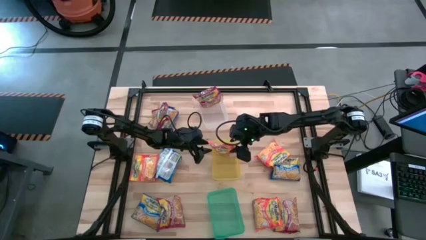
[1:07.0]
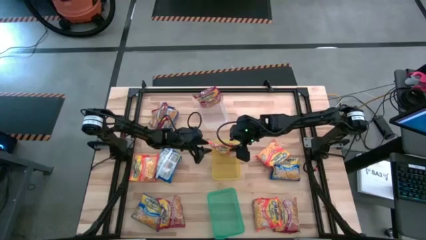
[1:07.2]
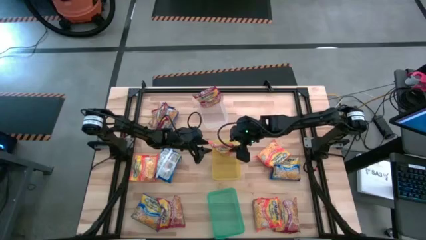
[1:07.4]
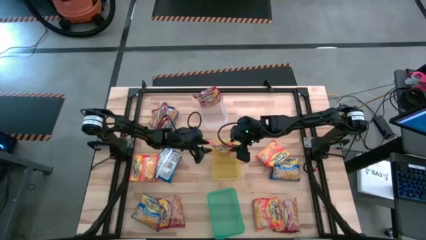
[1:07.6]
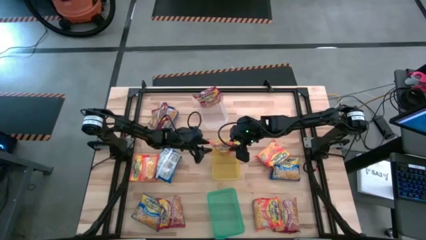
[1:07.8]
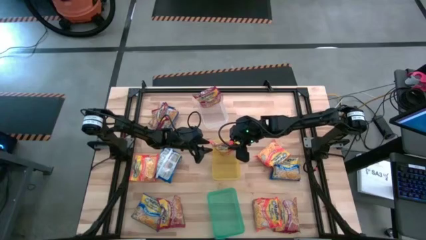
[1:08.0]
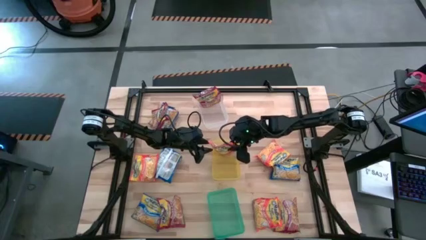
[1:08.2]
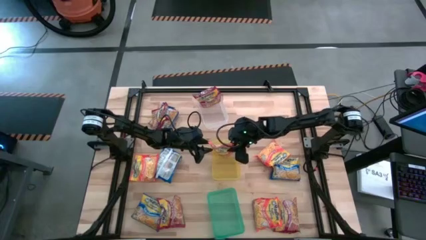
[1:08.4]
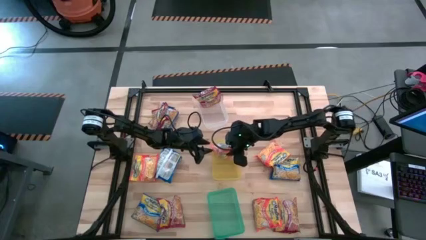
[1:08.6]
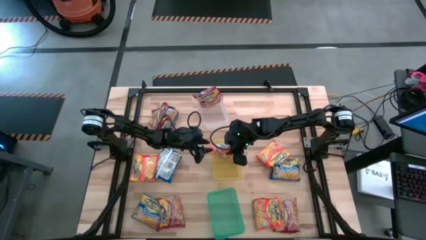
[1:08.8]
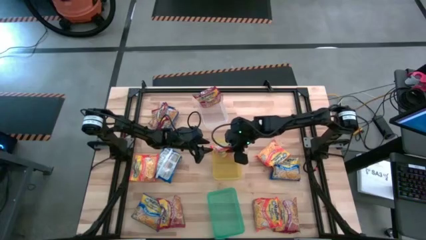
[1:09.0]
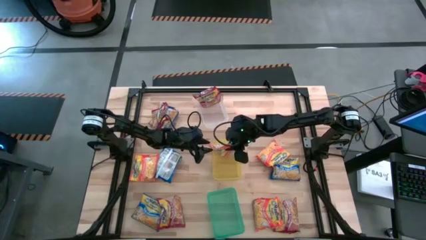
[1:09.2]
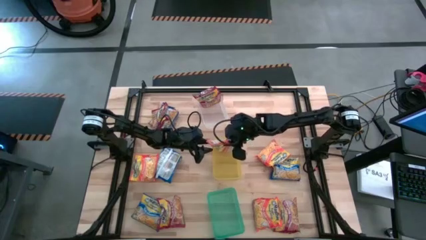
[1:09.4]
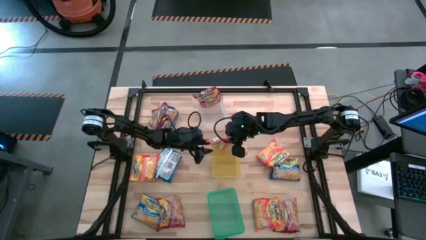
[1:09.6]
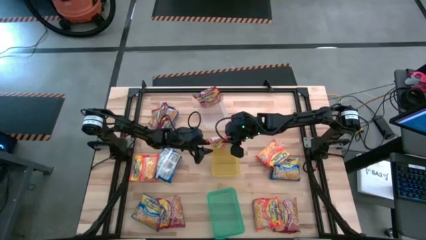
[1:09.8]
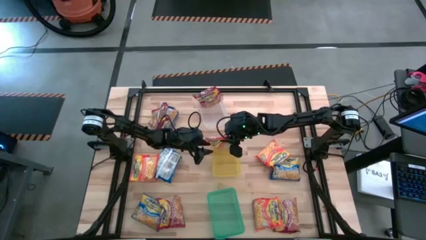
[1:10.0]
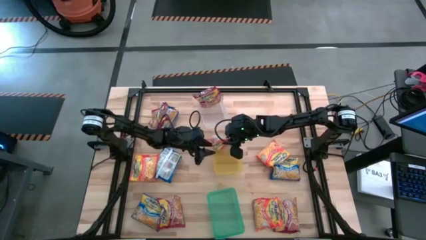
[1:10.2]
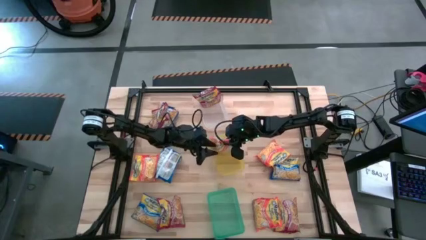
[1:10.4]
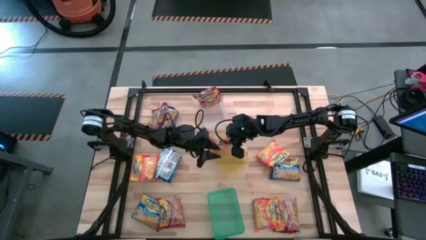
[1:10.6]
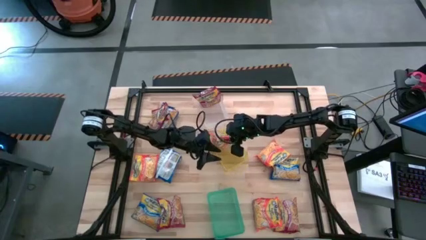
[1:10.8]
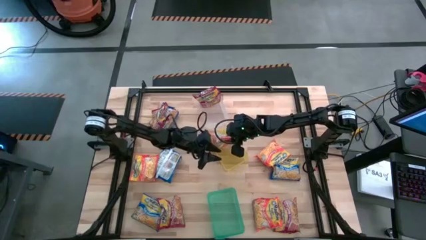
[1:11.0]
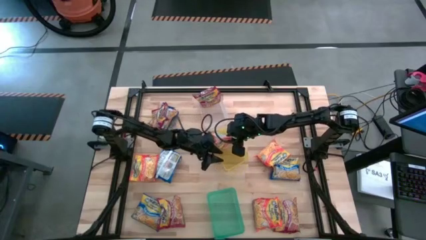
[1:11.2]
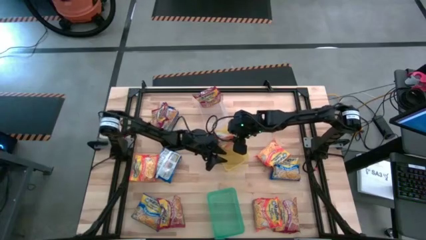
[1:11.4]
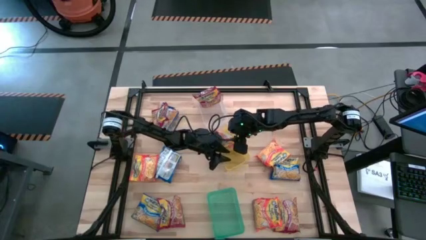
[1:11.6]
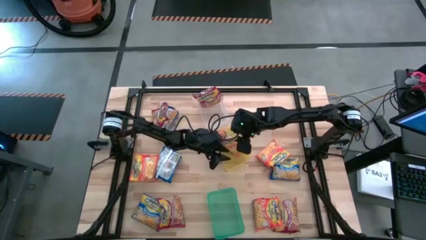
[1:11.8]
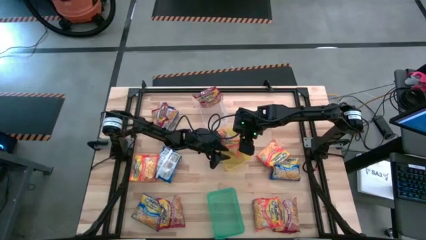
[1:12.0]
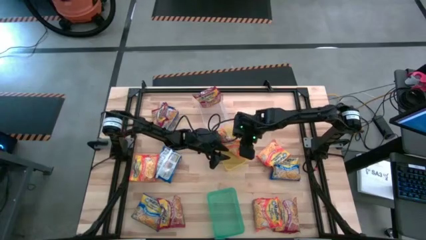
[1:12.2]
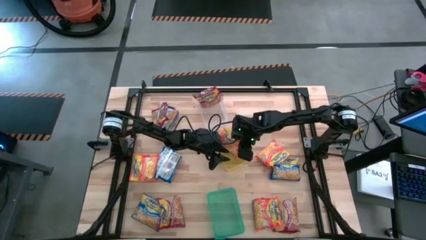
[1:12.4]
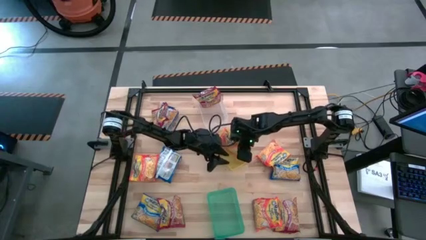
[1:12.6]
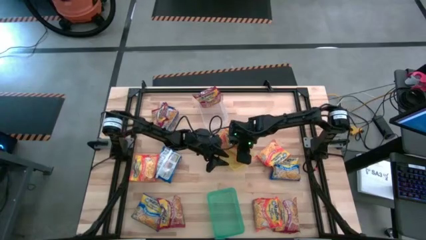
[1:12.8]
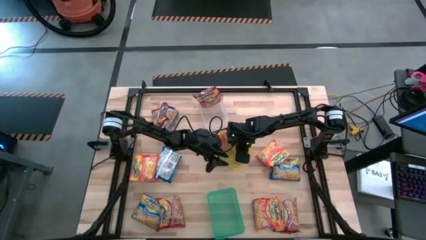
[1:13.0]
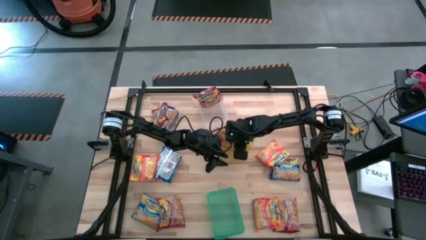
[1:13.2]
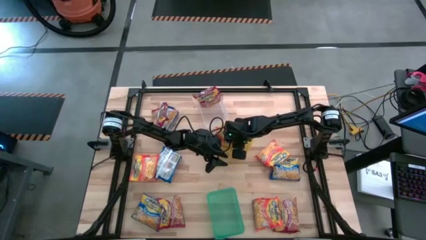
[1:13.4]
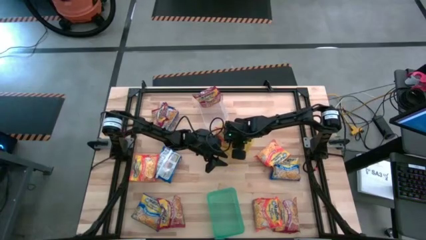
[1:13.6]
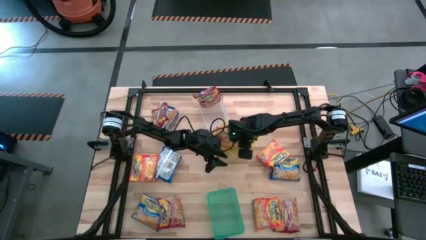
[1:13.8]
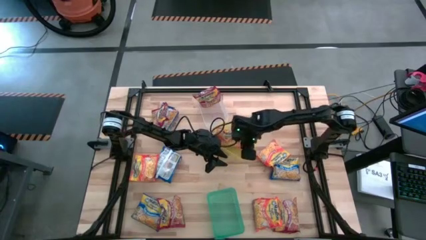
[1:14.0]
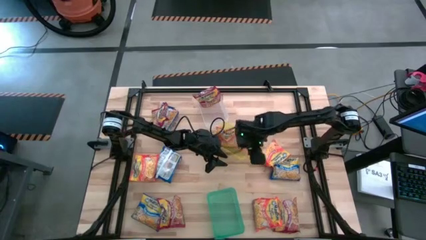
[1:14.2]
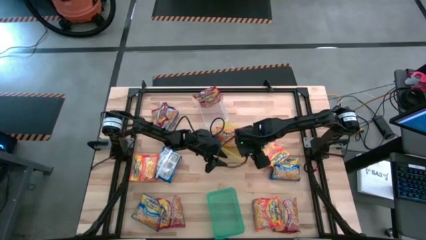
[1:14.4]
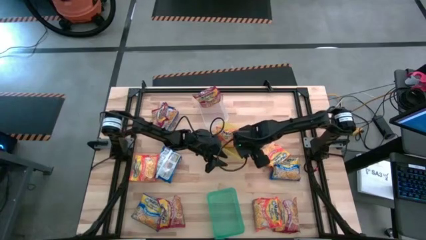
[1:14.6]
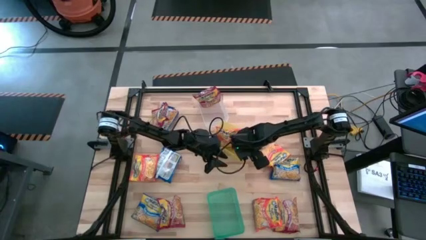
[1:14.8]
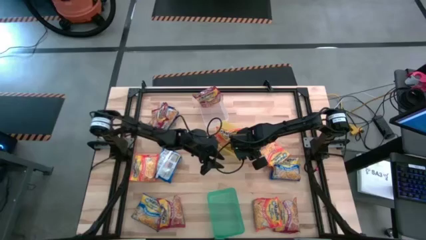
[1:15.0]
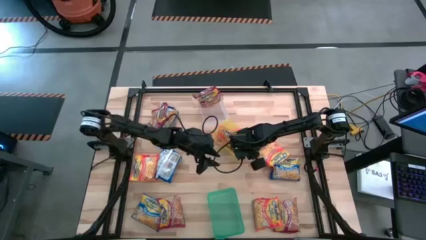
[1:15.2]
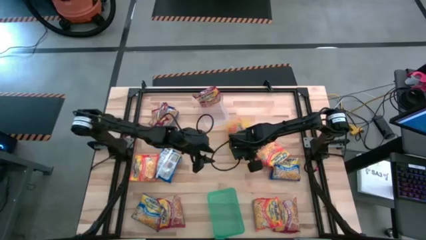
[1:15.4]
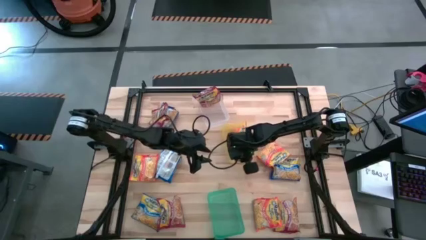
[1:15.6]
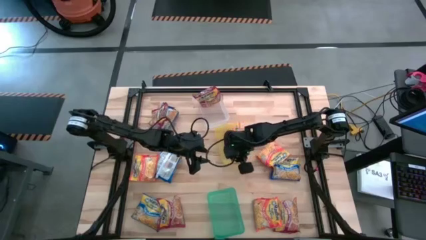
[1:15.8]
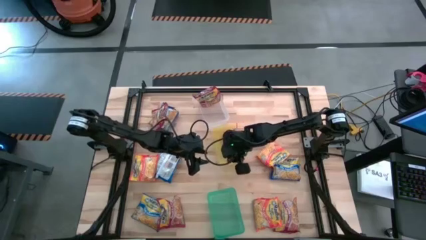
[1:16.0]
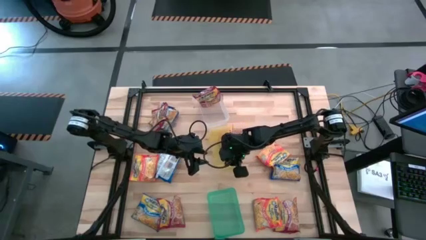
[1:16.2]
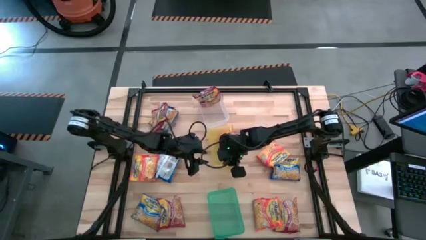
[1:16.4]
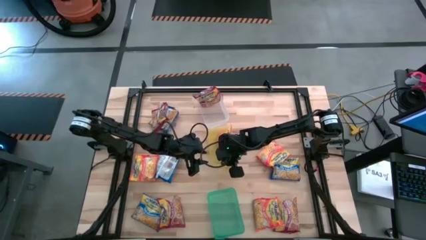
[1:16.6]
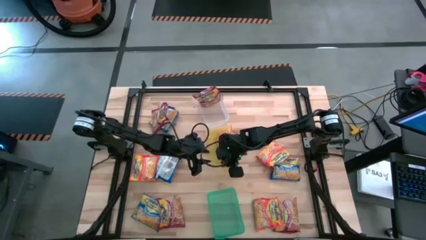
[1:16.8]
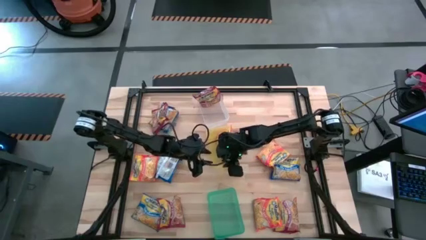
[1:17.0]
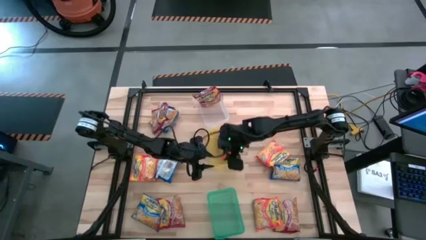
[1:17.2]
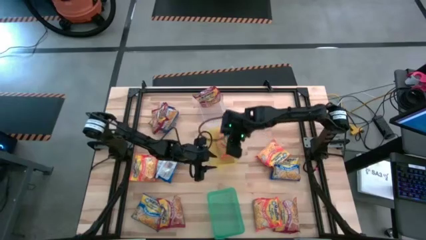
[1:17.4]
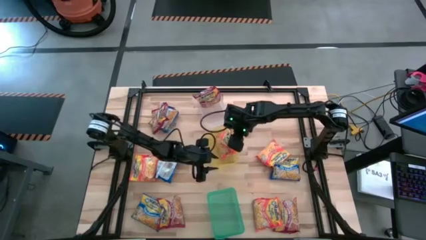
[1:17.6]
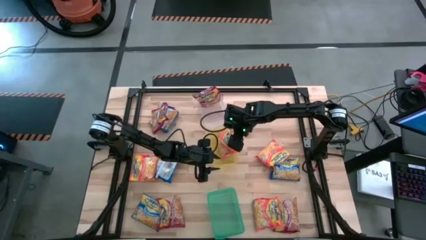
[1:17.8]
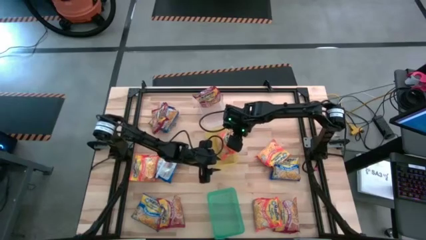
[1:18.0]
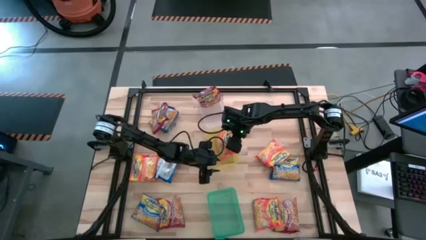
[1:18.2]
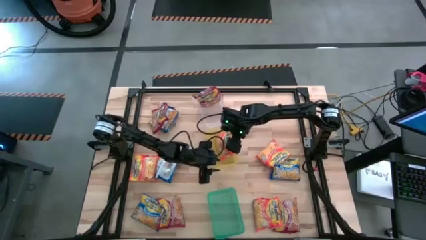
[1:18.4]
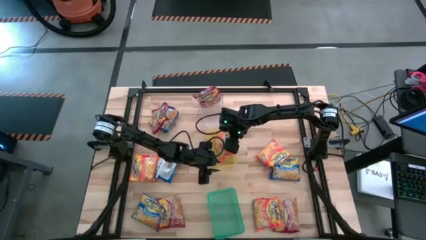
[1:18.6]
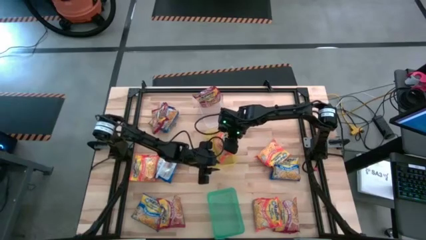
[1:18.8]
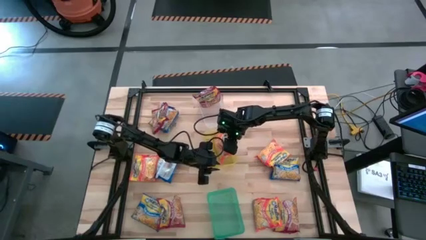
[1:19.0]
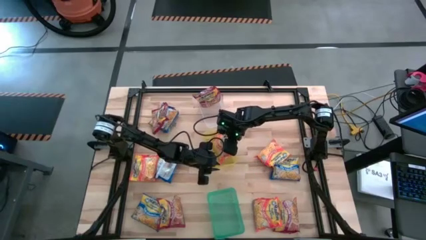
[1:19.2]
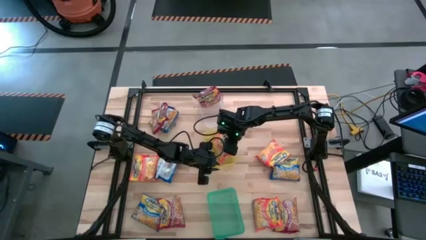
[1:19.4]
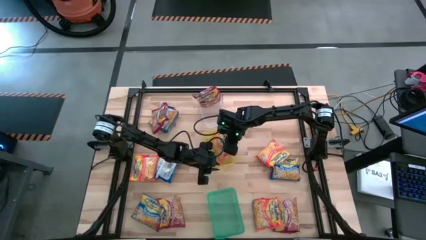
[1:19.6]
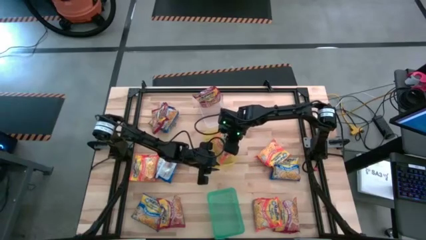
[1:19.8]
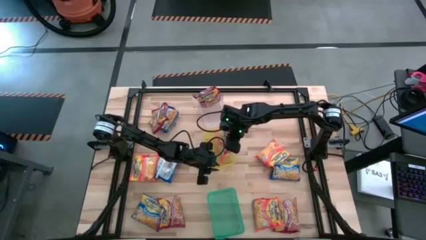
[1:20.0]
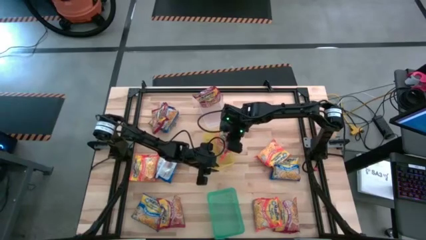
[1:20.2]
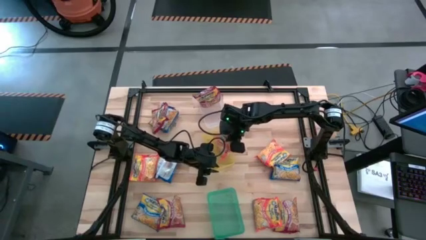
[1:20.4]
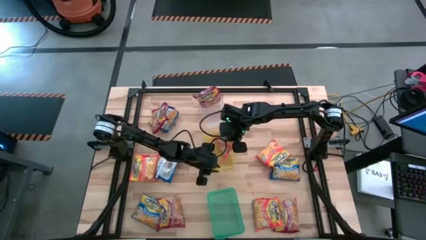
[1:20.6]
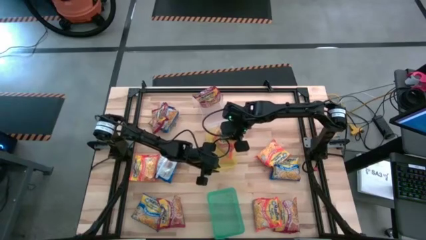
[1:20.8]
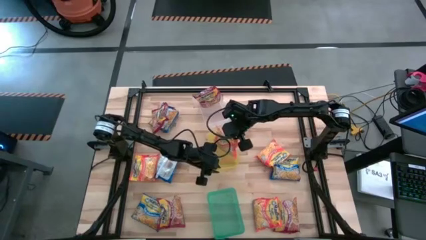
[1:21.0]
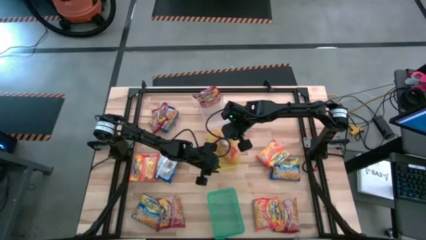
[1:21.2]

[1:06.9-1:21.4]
Task: Sort Maruchan noodles
Adjust the orange noodle pack in the yellow bin
